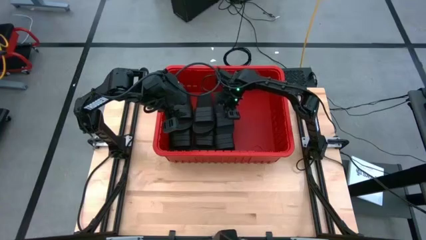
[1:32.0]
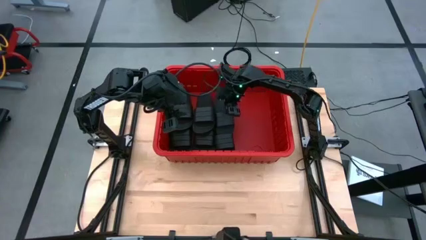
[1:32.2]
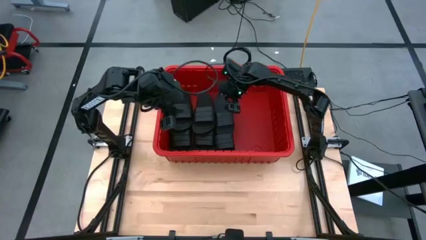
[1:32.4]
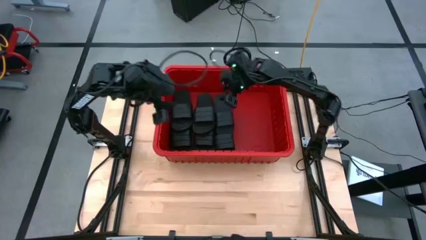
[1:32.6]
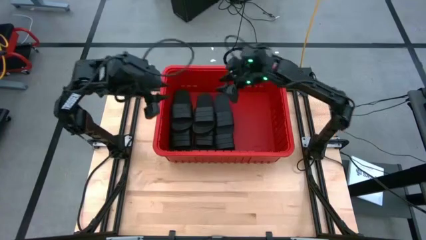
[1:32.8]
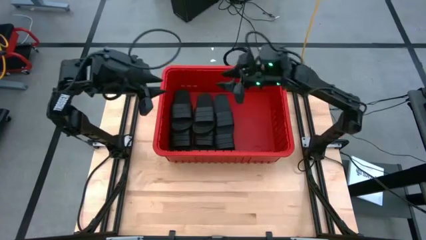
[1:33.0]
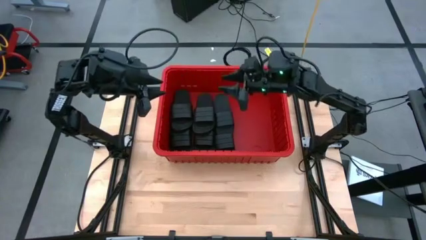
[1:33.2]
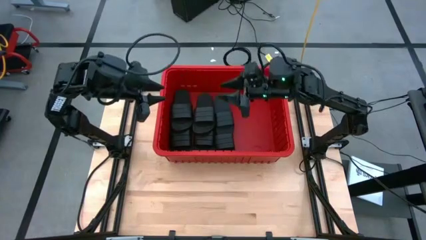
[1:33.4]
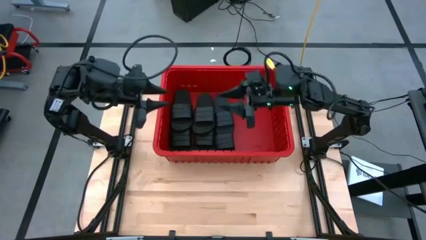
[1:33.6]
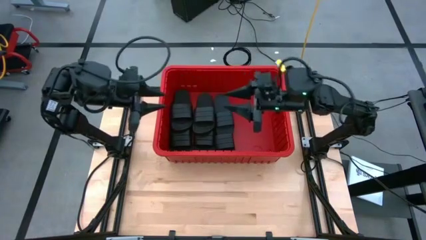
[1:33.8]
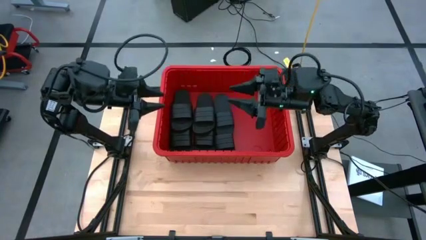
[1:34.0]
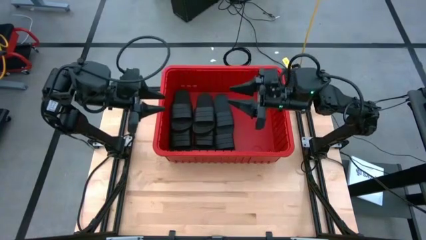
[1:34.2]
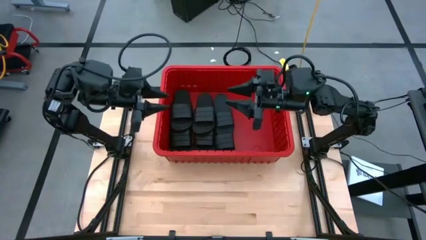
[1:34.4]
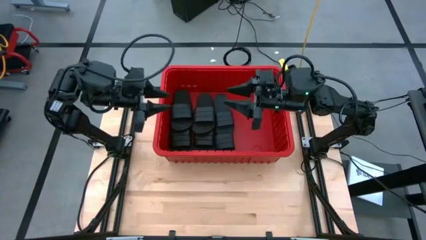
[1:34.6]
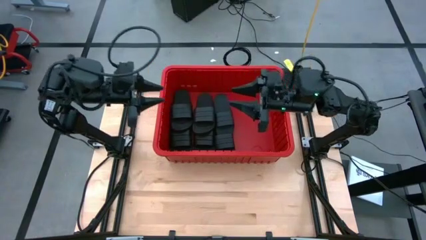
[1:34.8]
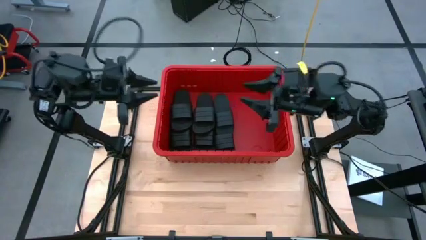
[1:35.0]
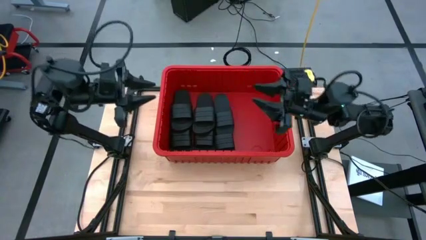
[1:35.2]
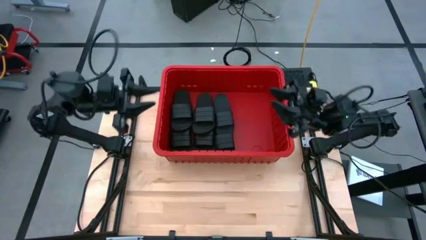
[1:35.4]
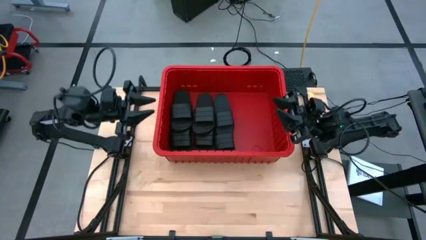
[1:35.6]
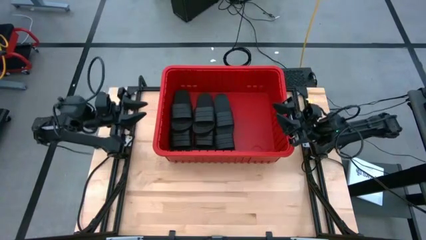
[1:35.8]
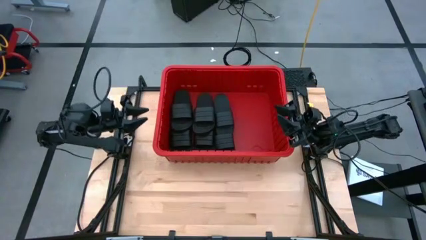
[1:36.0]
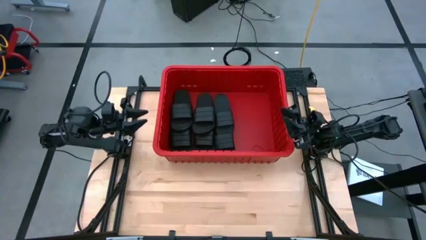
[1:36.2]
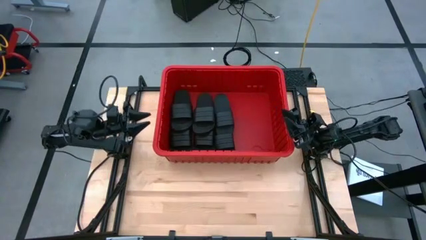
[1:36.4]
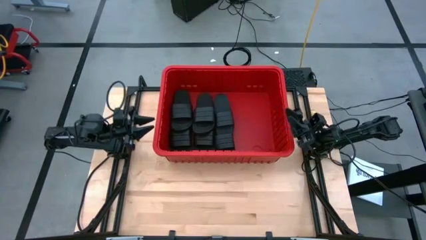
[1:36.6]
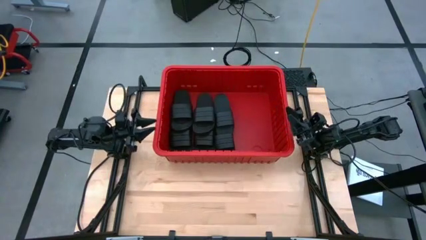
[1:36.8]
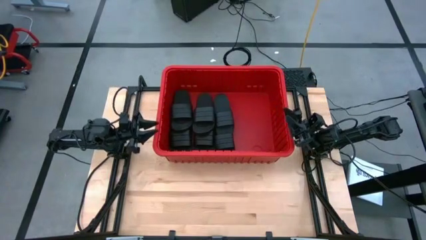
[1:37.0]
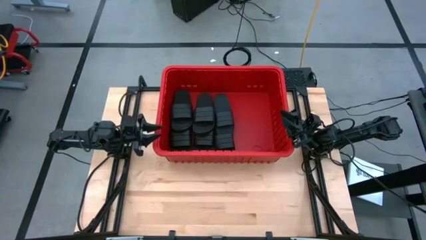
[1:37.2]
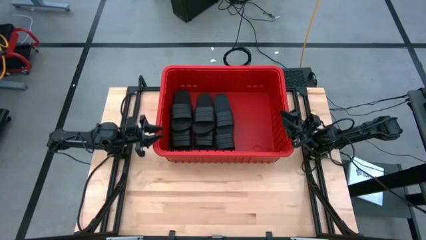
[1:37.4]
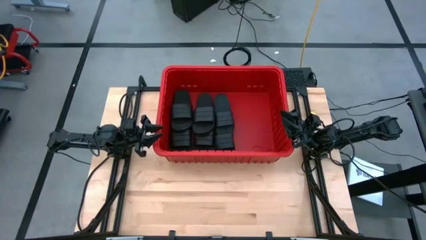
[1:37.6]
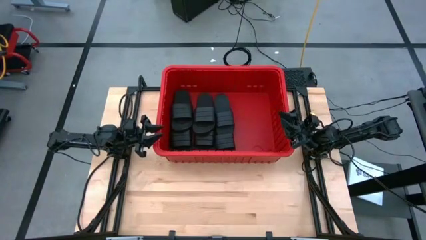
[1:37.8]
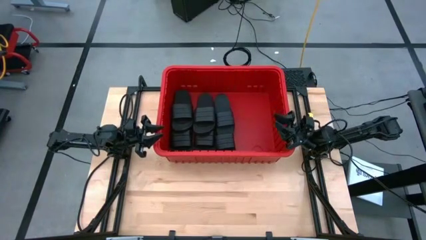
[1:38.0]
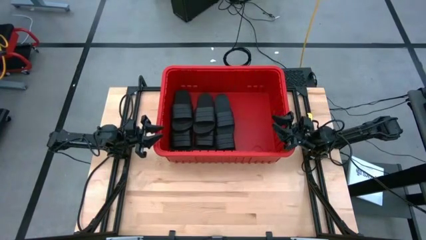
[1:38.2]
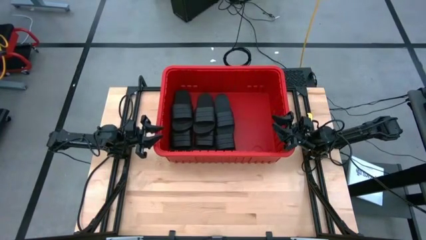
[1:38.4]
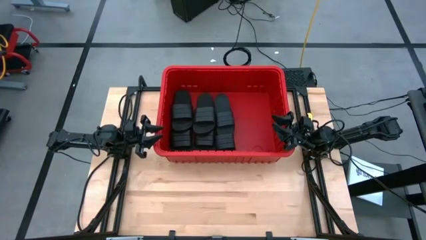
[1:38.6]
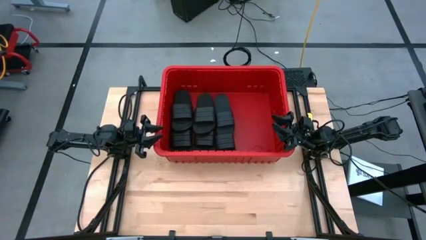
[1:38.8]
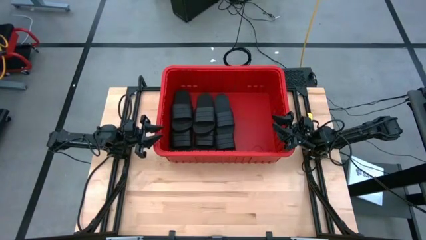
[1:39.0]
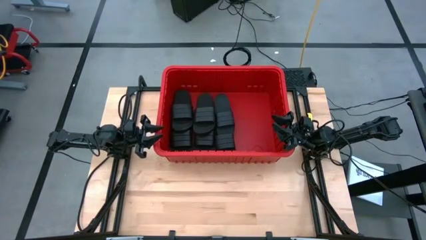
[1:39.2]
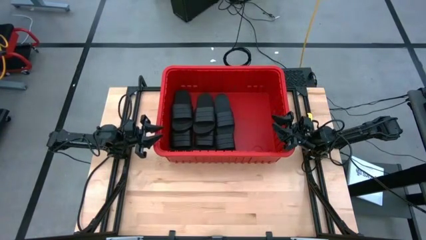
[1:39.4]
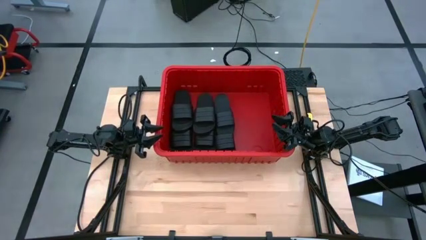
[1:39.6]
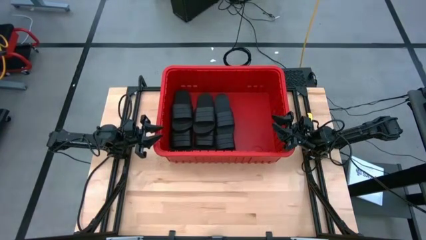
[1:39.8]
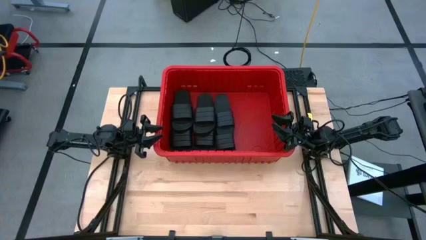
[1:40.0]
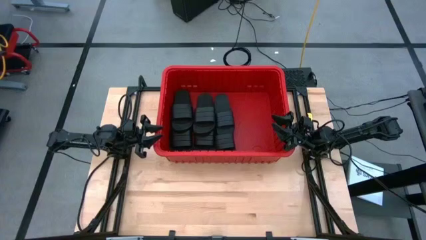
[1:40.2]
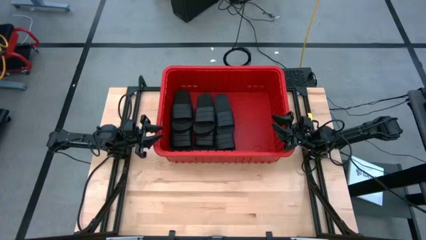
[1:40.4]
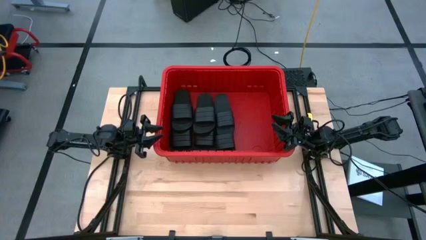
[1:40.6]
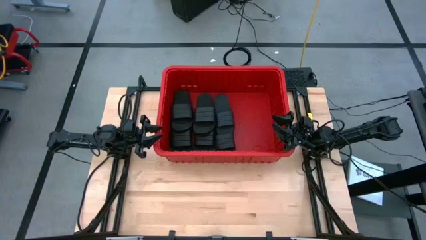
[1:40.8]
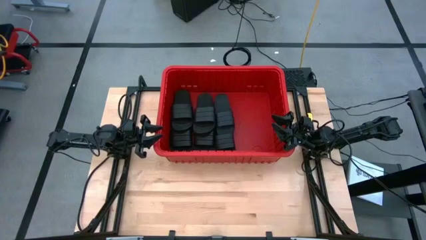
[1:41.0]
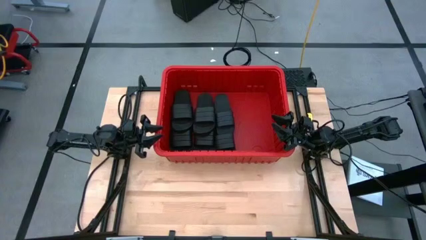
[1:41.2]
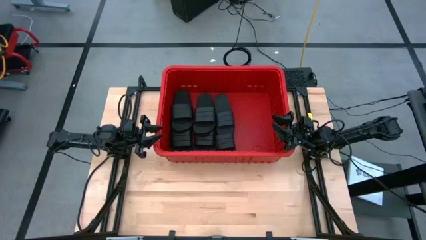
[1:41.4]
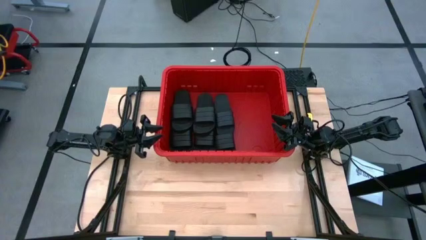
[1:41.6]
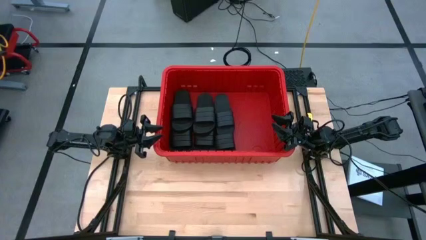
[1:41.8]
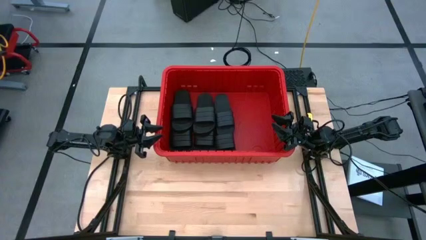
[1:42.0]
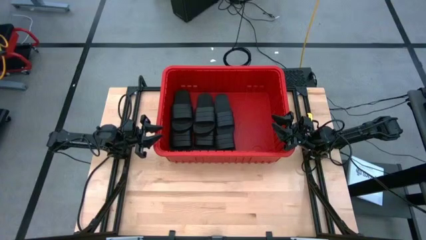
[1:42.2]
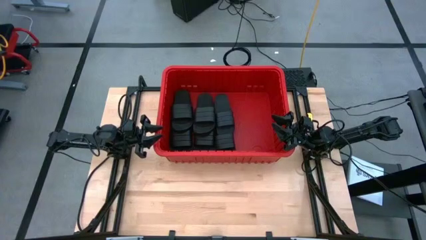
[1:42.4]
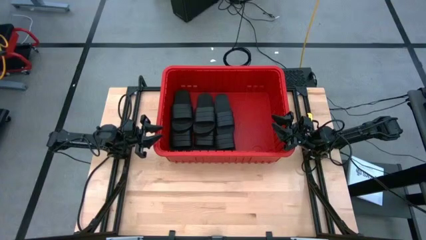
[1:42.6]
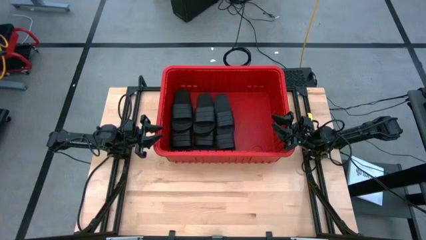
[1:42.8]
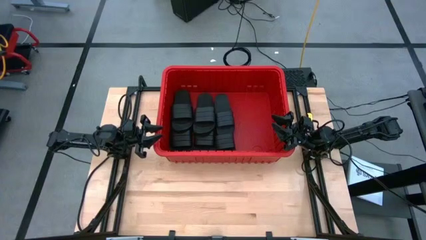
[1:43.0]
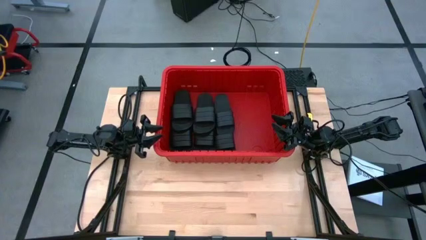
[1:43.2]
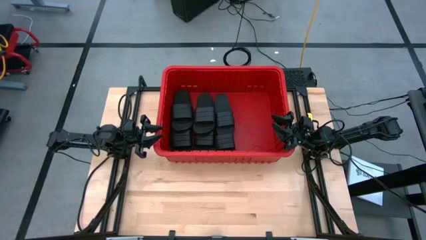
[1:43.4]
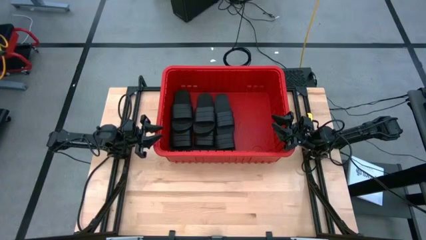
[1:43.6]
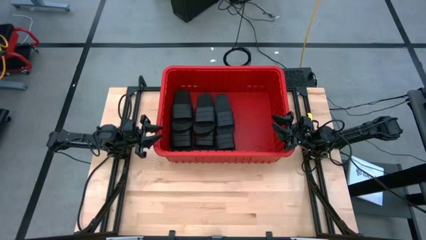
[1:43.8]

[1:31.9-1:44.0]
Task: Pick and place slides into bin
Return to Home Position

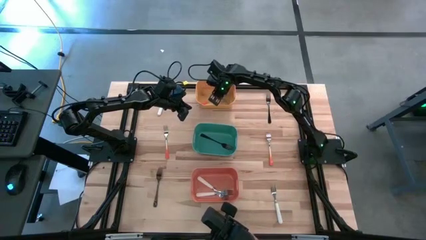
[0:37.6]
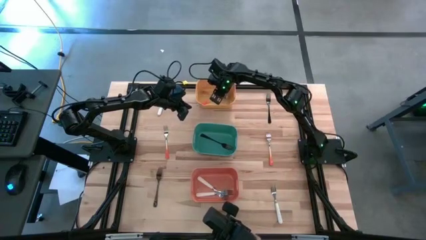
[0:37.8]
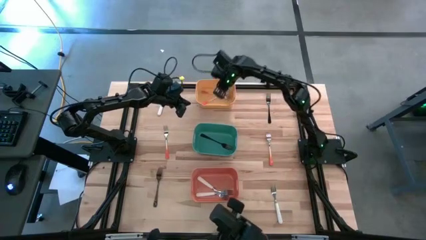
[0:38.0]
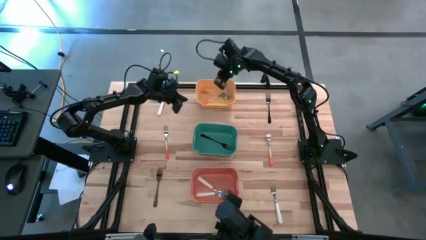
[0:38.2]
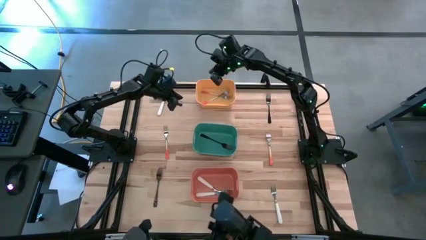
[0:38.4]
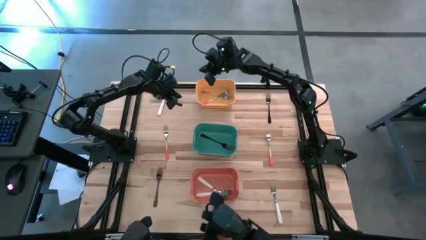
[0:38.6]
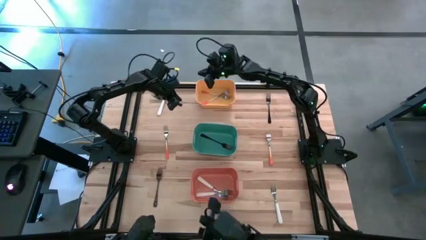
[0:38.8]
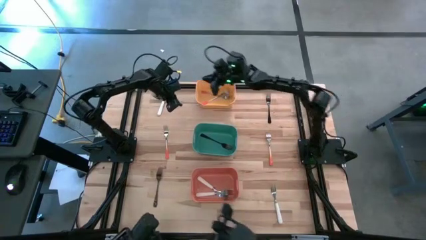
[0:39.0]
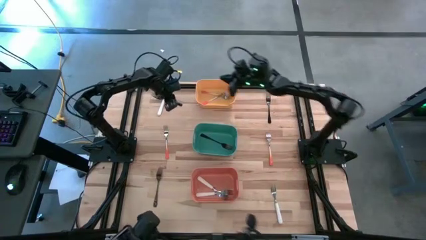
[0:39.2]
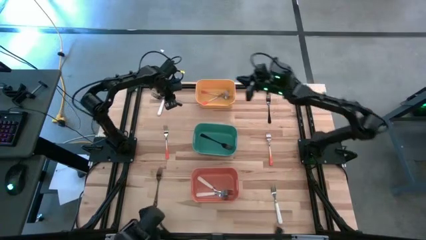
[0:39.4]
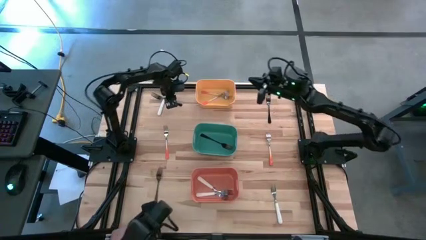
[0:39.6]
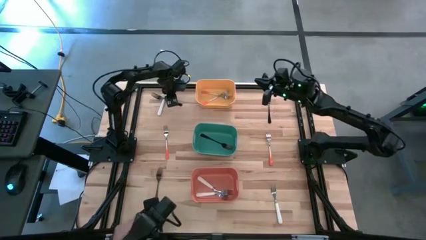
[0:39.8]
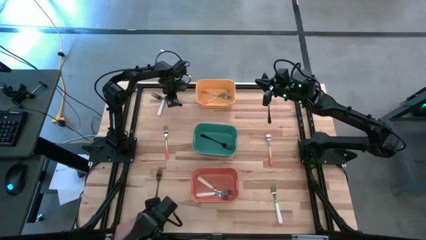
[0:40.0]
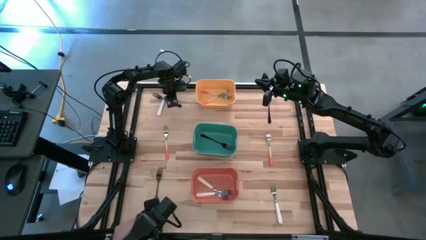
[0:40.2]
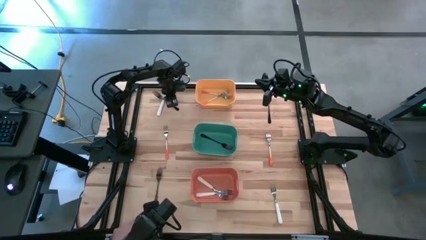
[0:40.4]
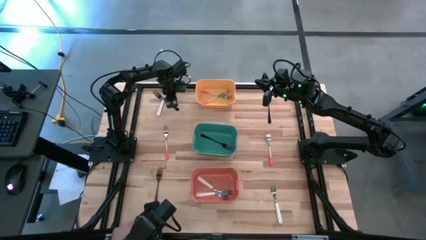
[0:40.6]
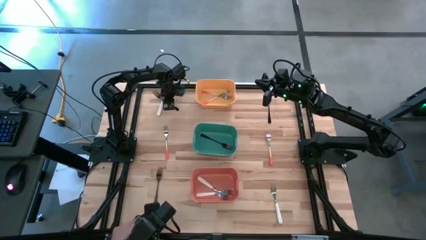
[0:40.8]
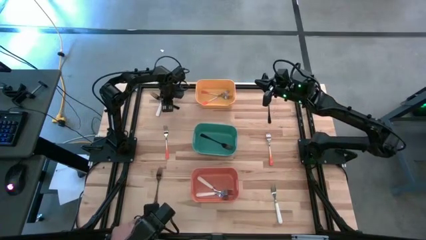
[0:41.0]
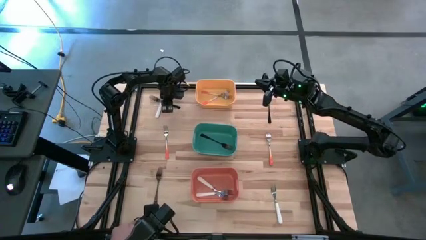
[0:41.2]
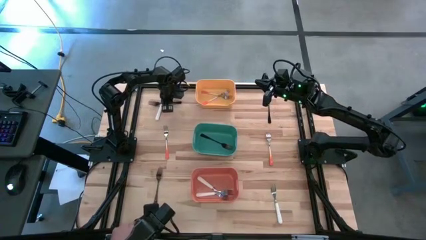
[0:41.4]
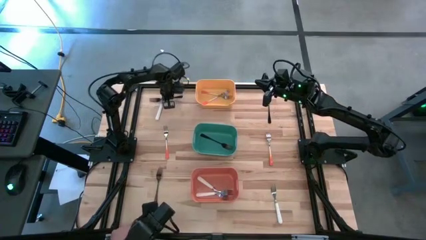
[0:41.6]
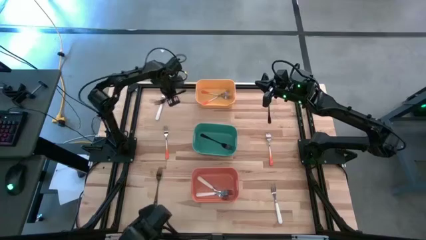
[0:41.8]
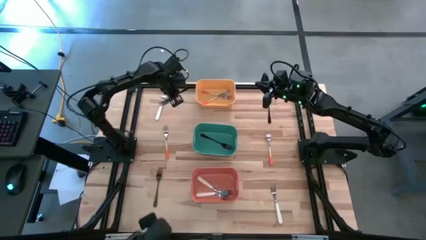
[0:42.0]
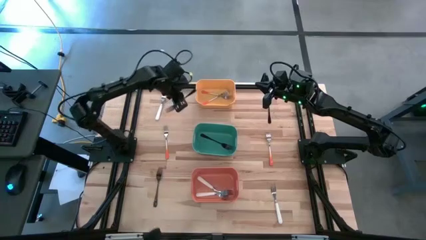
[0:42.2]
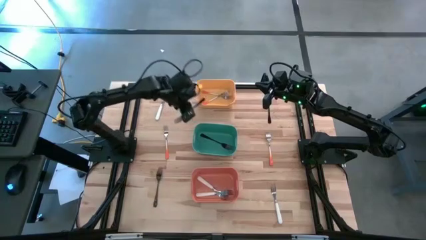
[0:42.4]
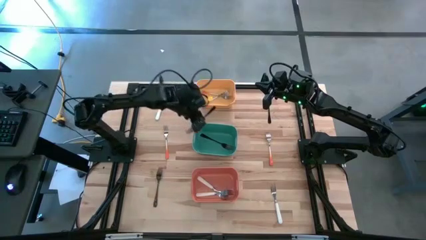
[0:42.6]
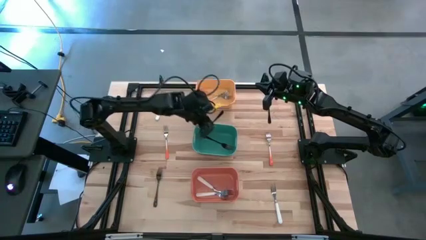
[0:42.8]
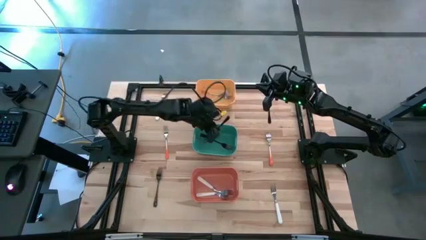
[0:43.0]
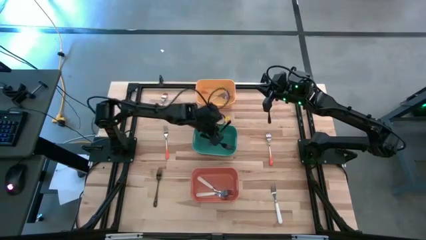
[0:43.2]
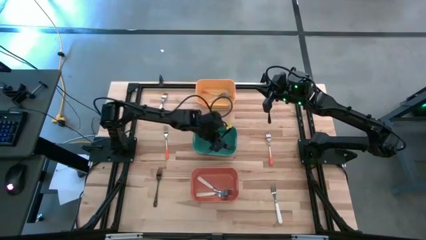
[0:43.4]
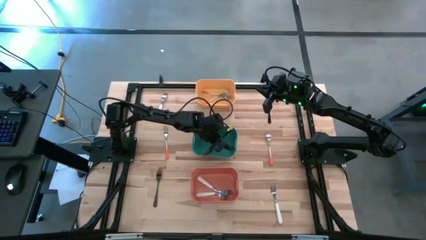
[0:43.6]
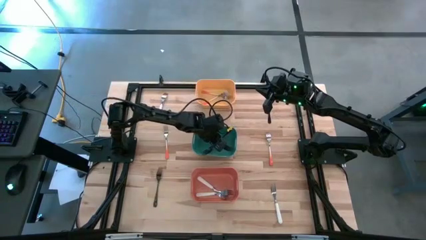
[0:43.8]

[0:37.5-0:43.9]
Task: Sort silverware by color (type)
Put the black fork into the green bin
